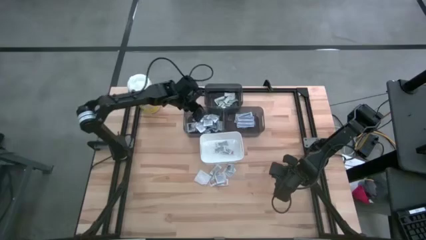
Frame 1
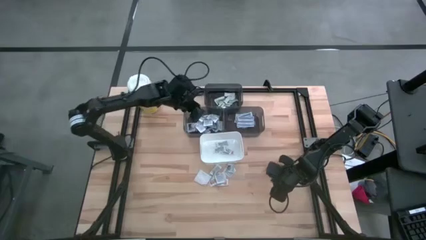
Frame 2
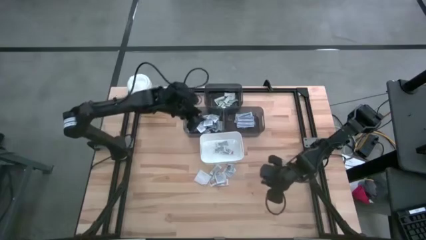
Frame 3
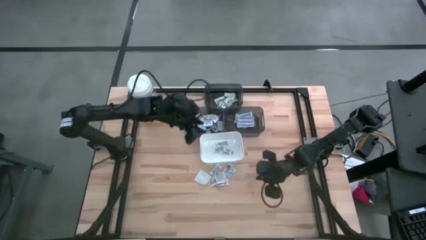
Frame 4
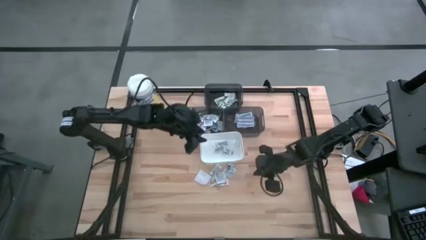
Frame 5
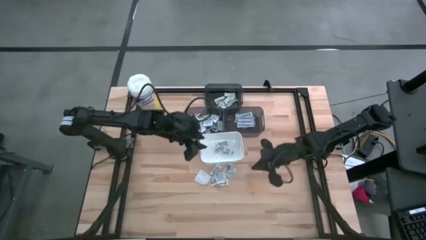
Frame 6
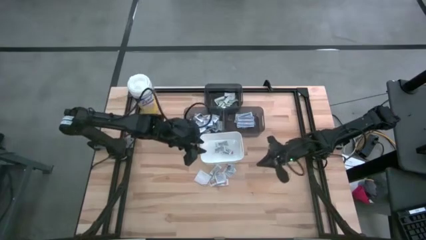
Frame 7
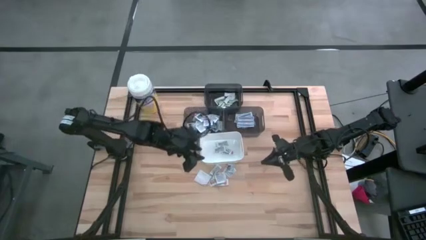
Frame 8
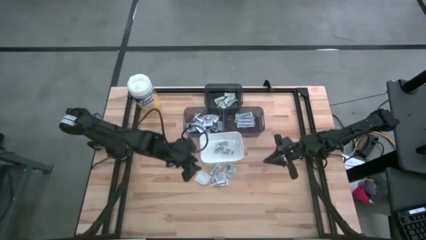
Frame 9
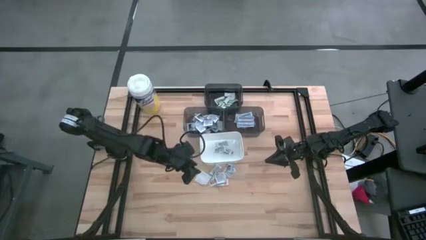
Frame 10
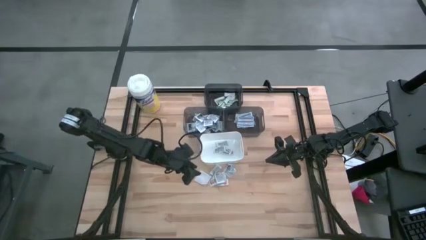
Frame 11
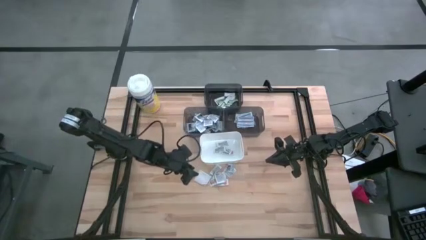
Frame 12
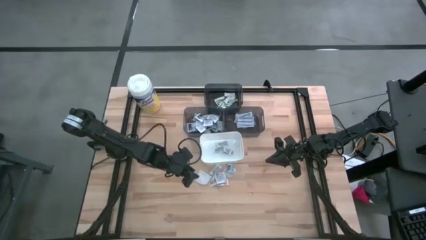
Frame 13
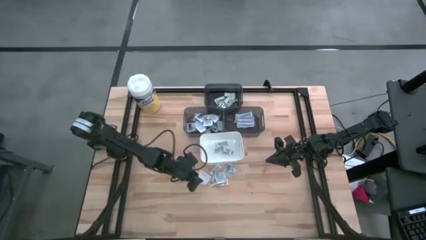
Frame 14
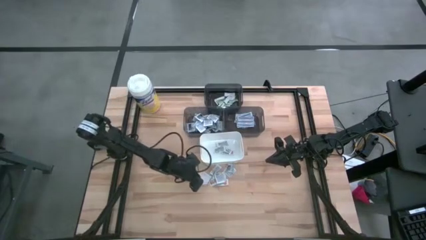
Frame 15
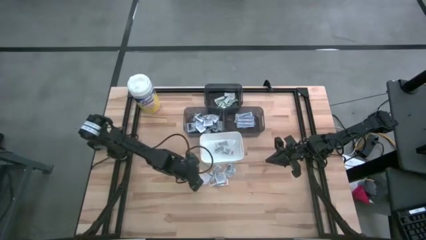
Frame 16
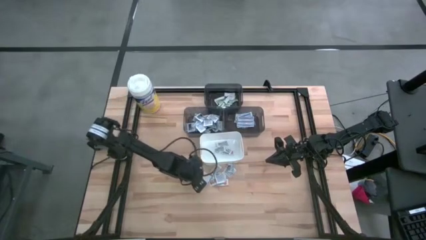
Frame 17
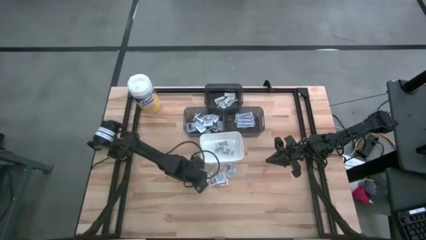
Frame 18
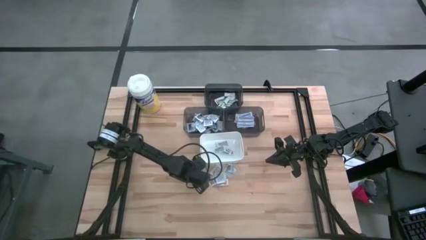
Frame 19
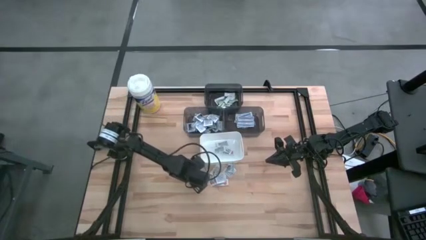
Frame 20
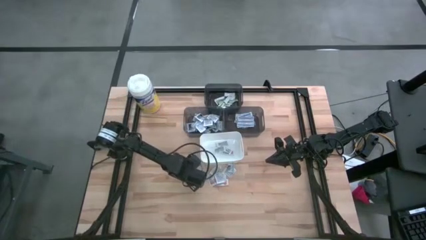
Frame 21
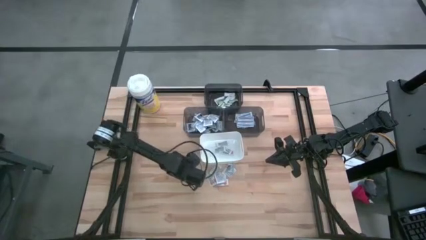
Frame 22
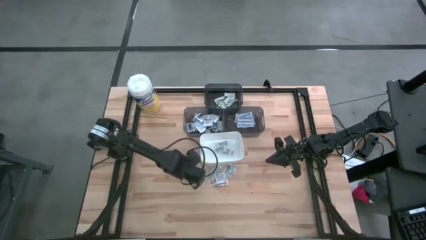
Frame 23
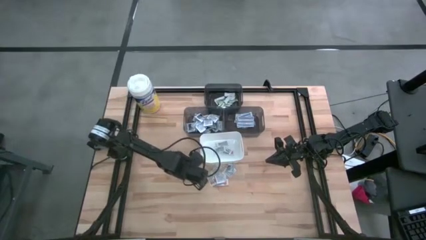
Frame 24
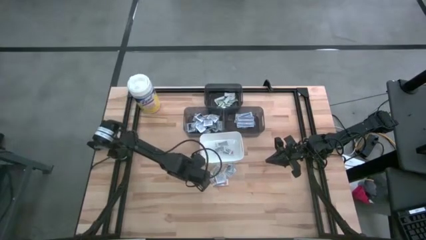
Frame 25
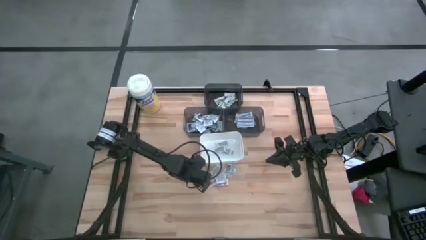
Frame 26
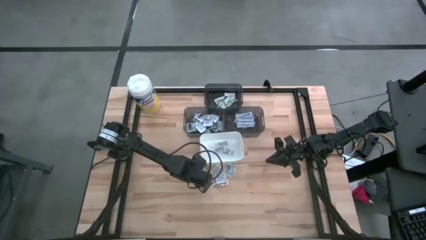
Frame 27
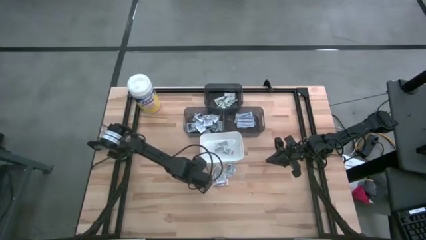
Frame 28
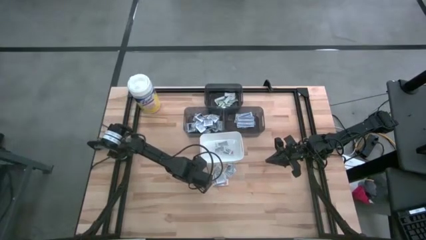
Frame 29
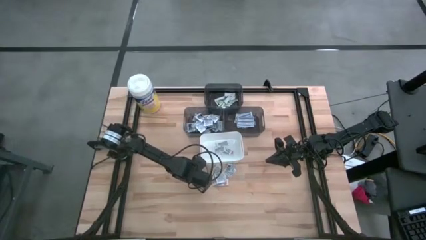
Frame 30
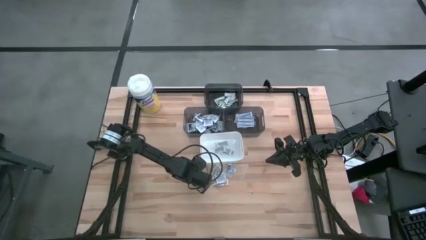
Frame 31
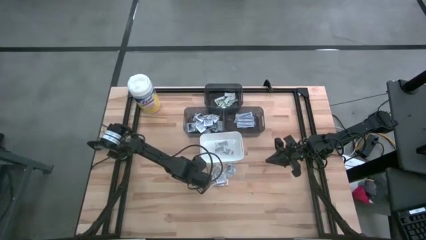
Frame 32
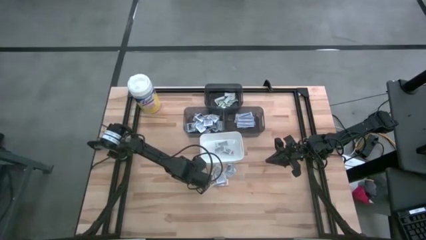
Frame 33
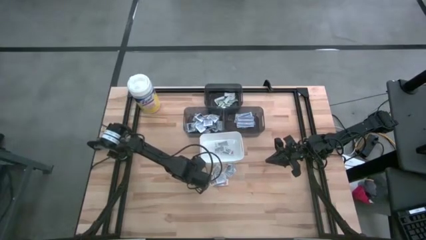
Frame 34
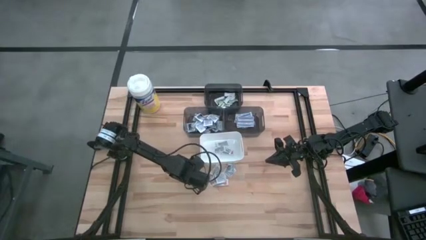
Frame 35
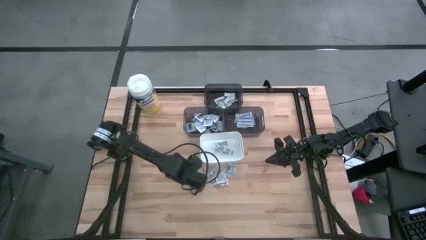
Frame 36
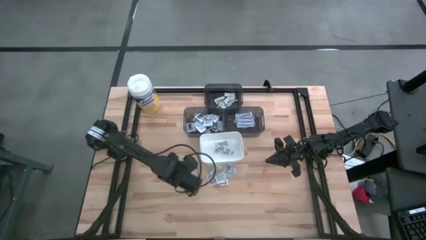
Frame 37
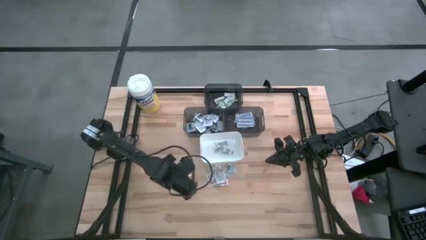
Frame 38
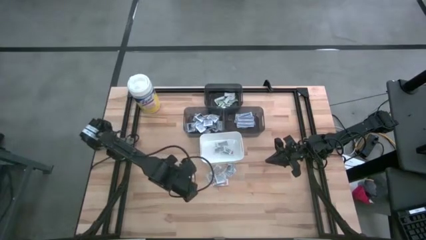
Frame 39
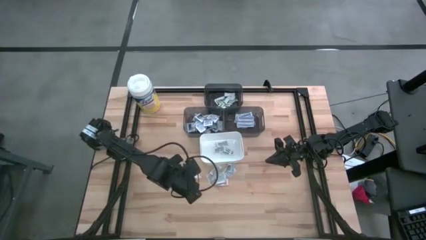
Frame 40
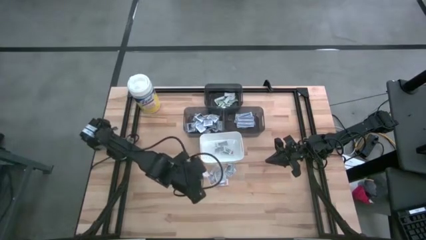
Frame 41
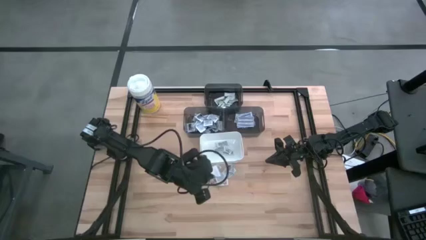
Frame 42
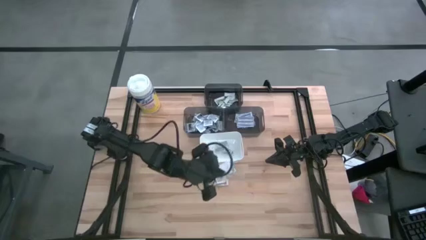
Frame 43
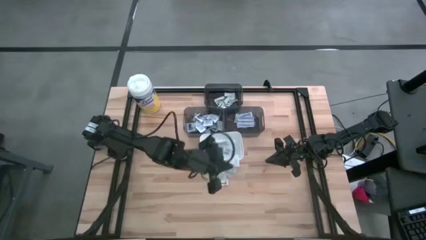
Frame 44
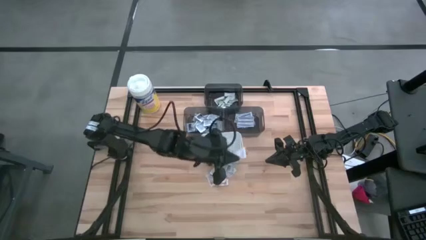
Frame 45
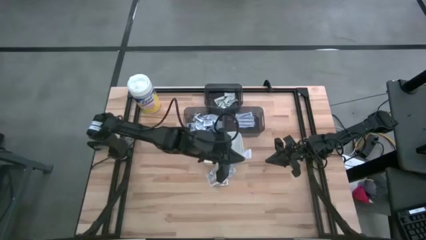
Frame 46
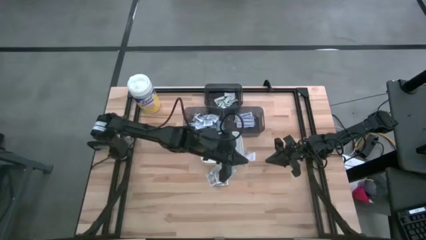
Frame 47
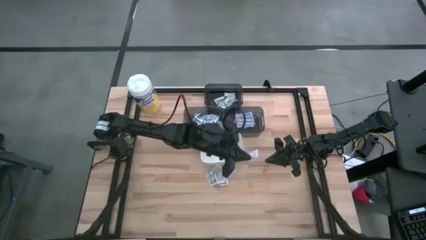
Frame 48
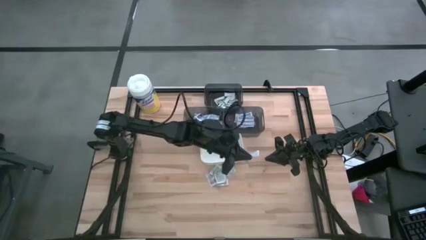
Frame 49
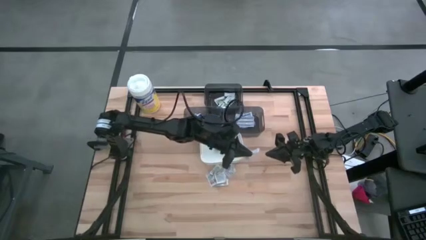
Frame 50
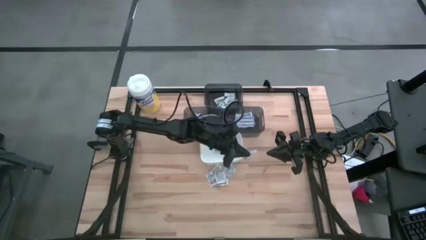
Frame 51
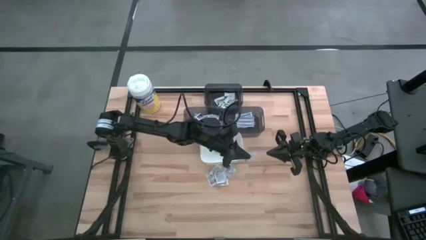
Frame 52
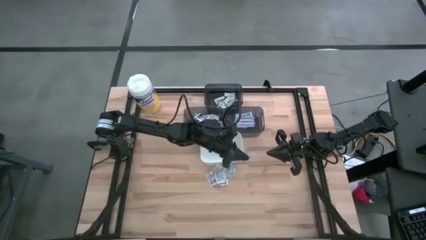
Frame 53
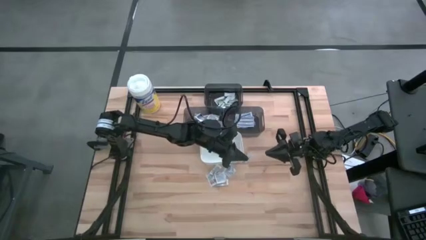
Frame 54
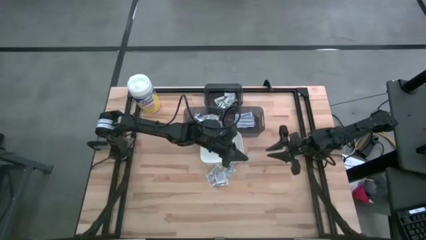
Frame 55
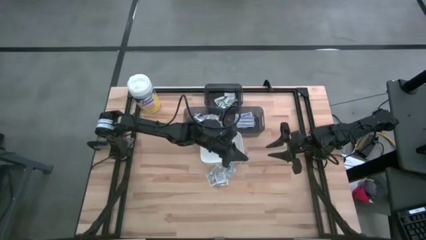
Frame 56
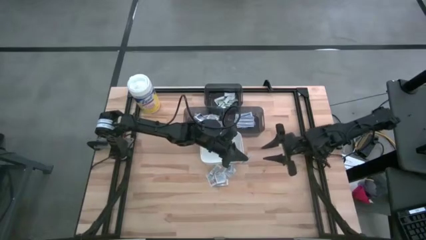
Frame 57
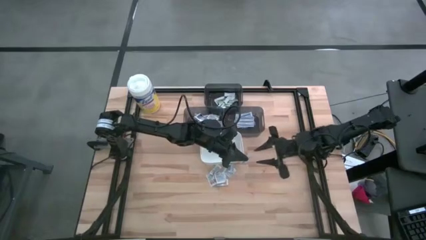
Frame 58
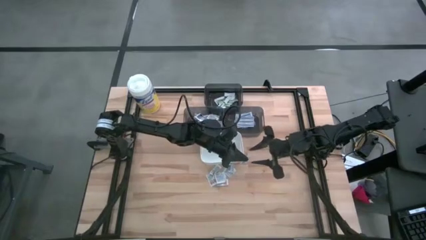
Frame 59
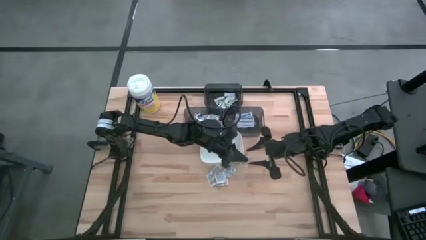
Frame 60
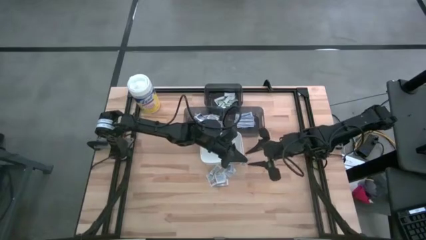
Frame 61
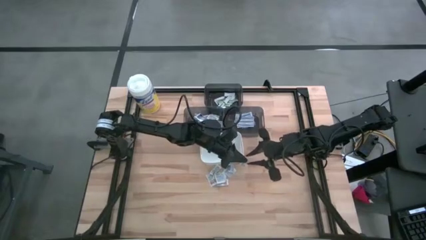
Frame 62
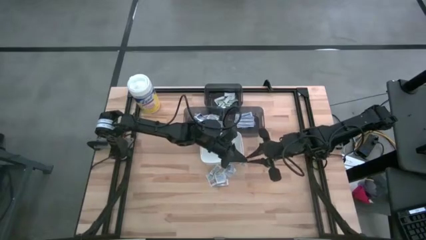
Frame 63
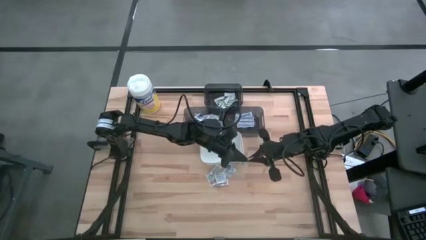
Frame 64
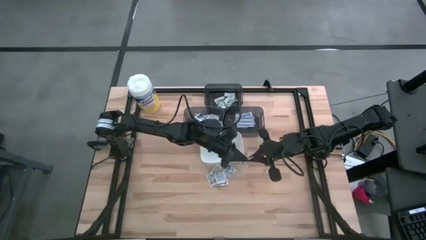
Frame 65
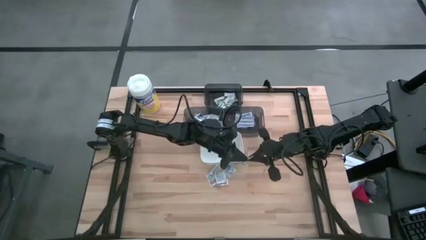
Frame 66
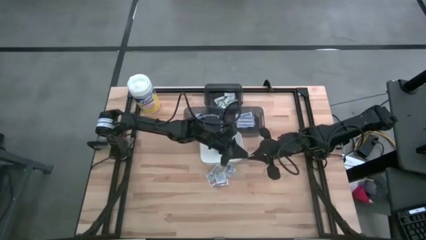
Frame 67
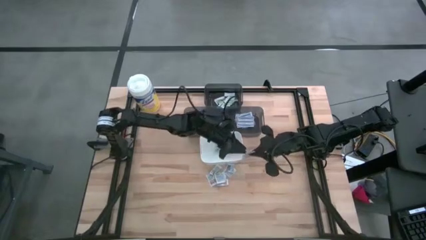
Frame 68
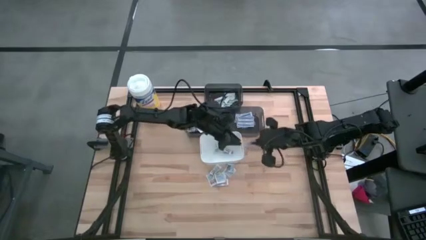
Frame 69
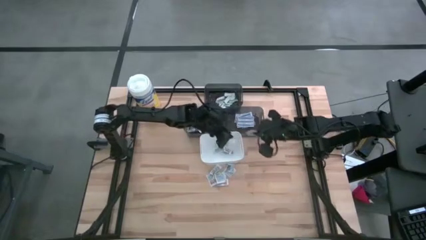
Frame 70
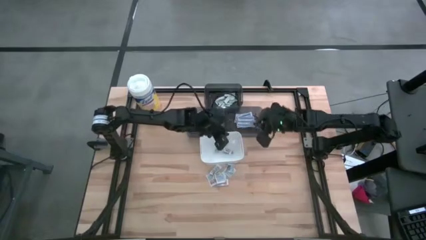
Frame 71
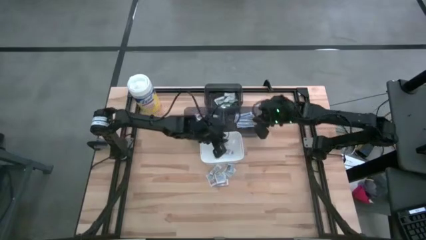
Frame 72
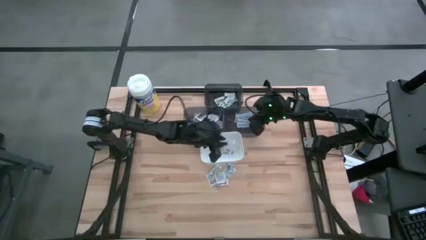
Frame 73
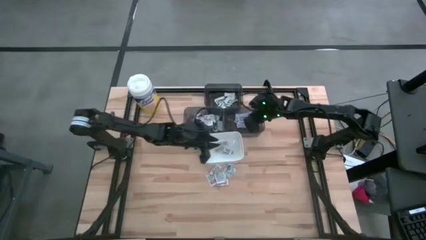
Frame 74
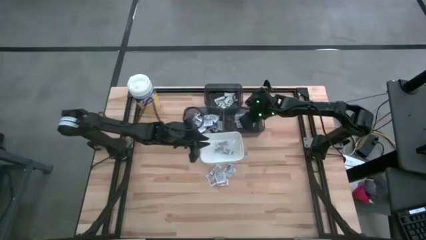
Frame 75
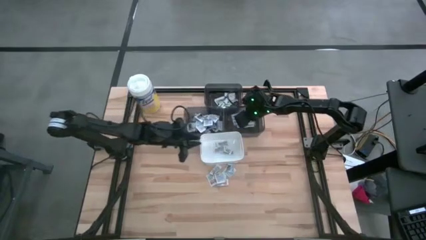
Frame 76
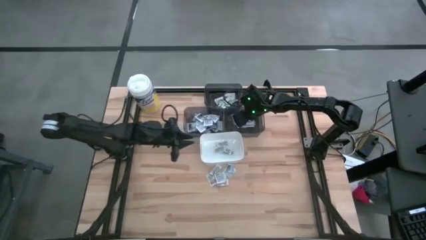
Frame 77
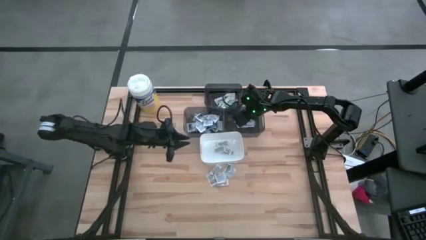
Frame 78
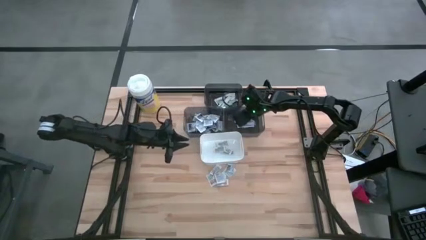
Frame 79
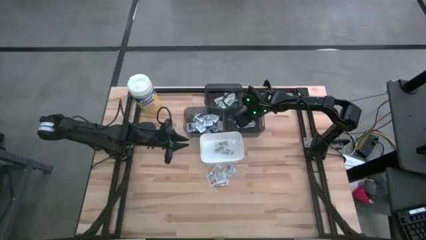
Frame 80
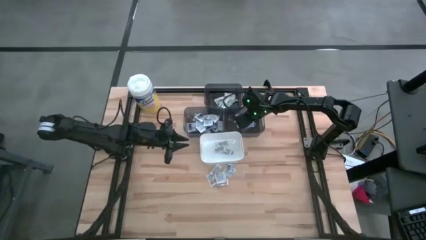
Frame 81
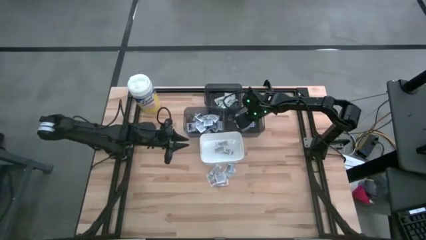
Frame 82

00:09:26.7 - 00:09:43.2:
Task: Pick & Place First Aid Supplies
Put the blue bandage into the right black bin
